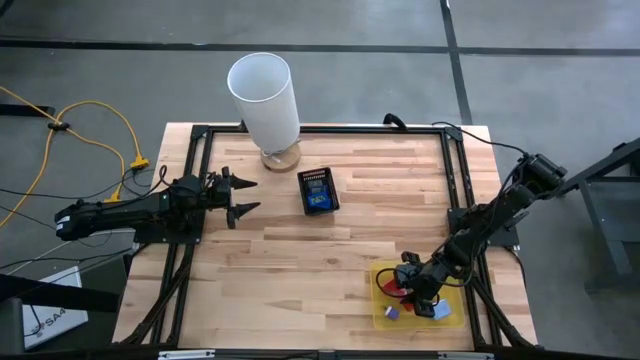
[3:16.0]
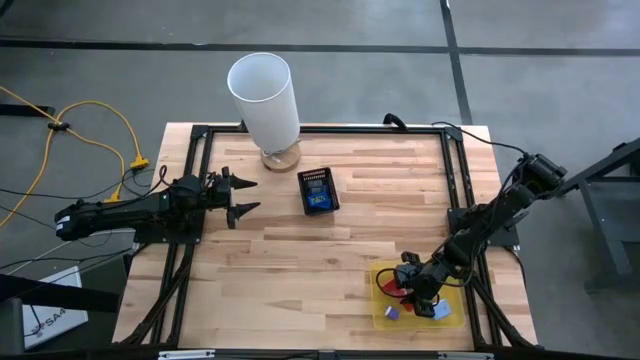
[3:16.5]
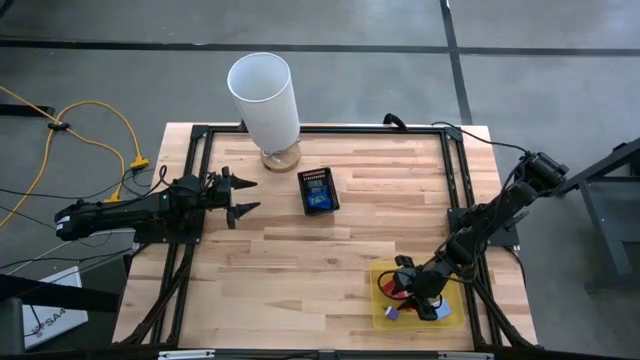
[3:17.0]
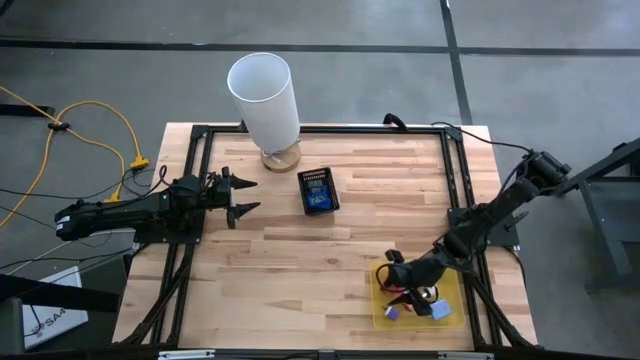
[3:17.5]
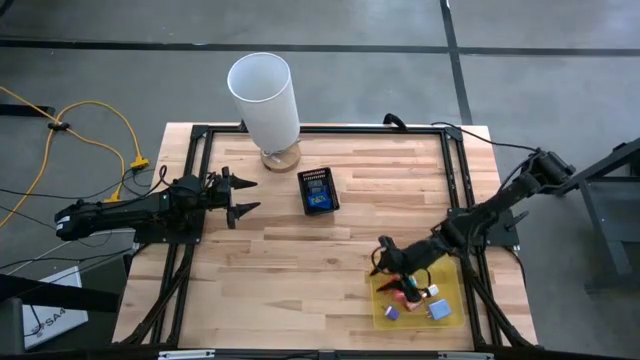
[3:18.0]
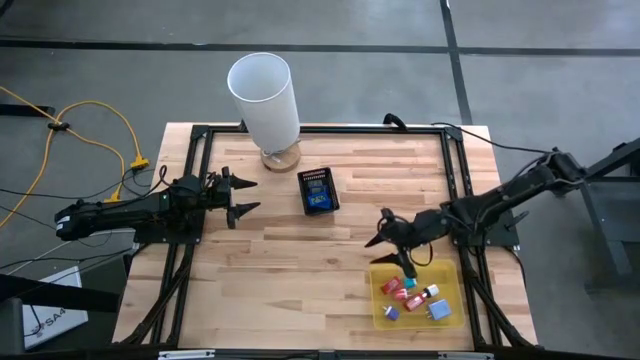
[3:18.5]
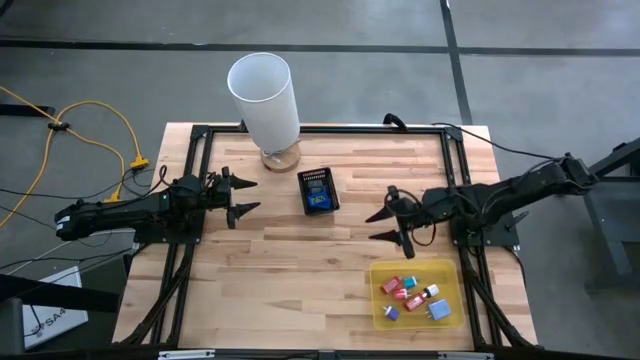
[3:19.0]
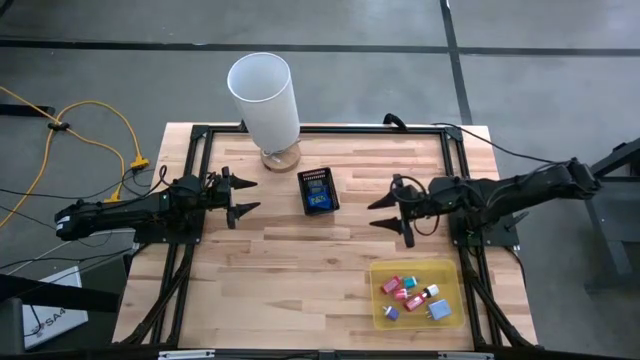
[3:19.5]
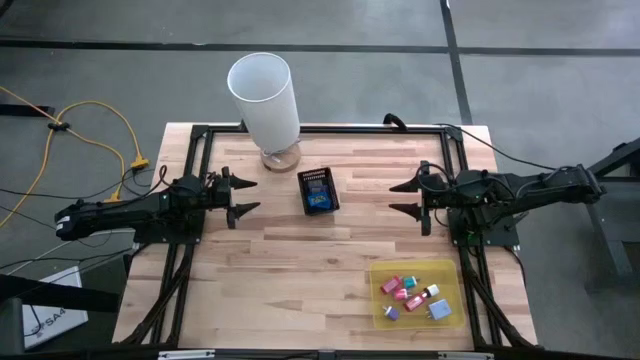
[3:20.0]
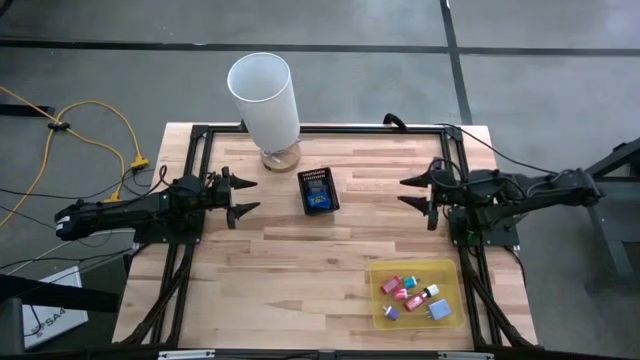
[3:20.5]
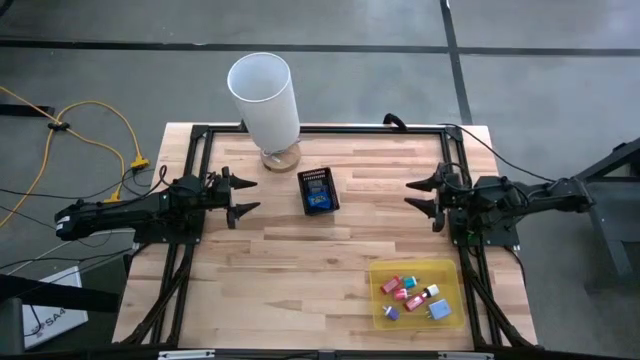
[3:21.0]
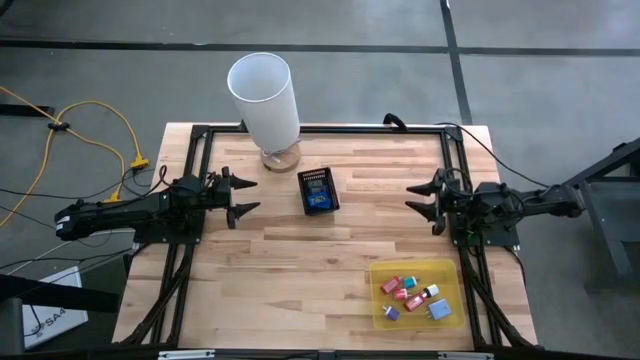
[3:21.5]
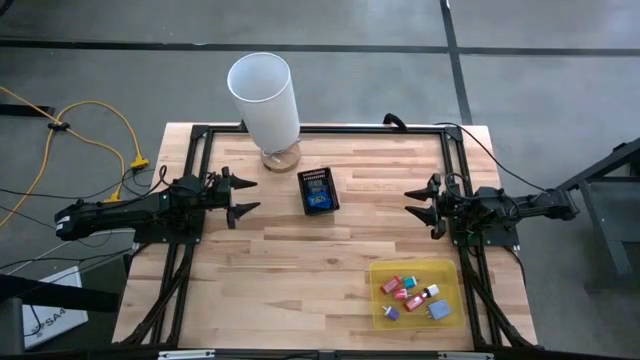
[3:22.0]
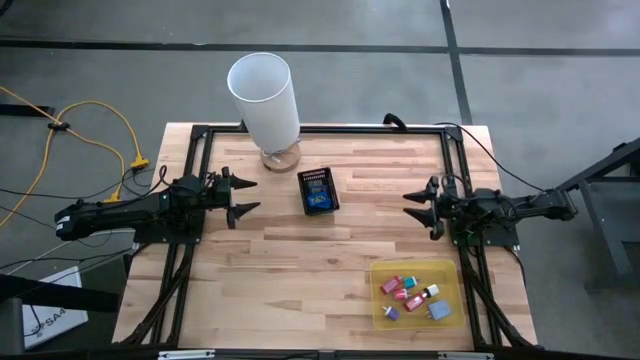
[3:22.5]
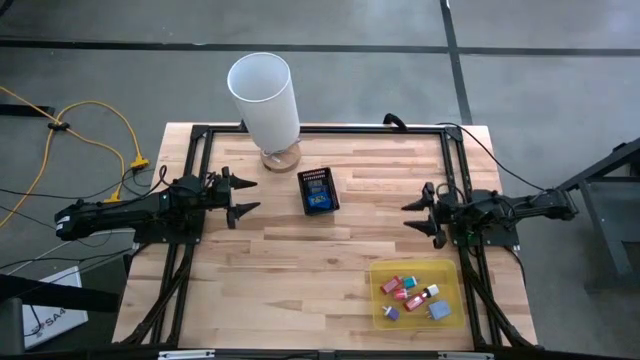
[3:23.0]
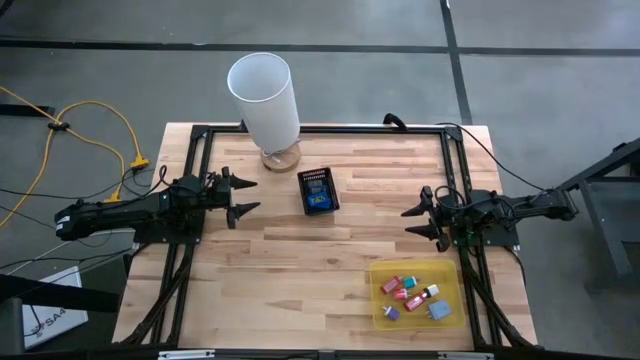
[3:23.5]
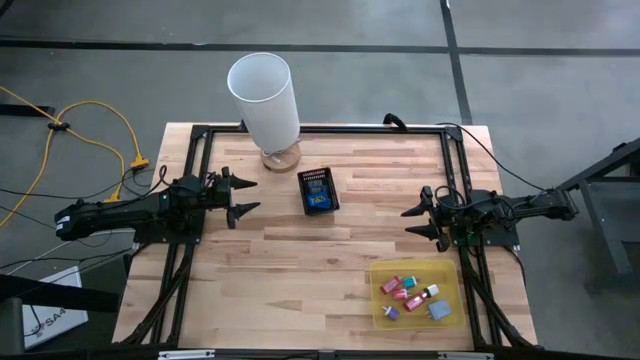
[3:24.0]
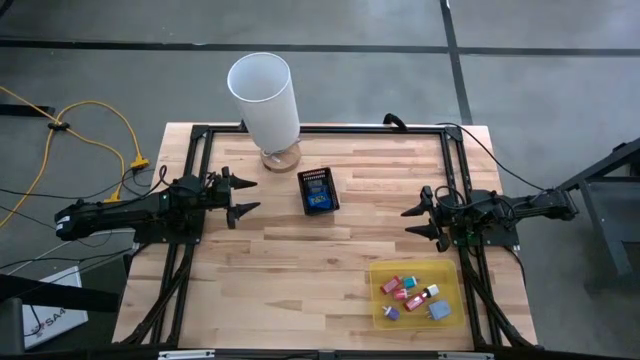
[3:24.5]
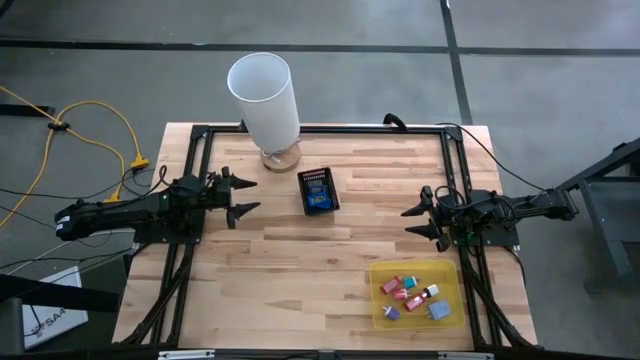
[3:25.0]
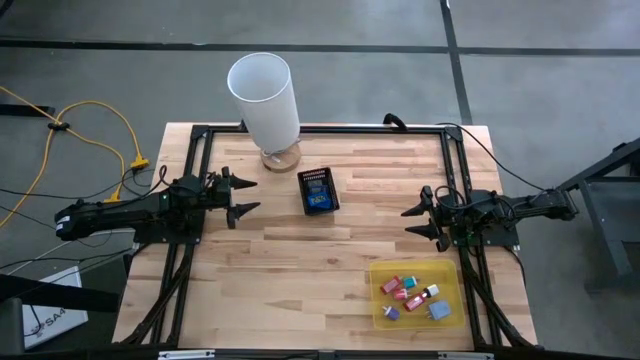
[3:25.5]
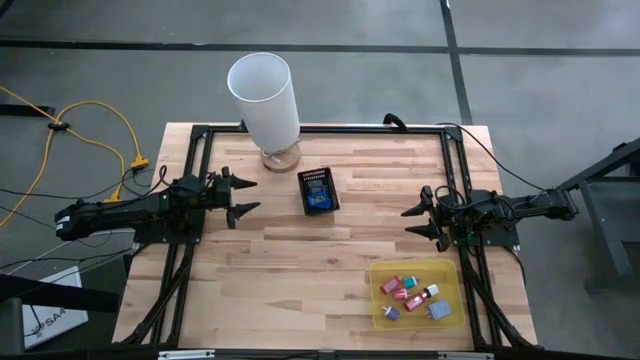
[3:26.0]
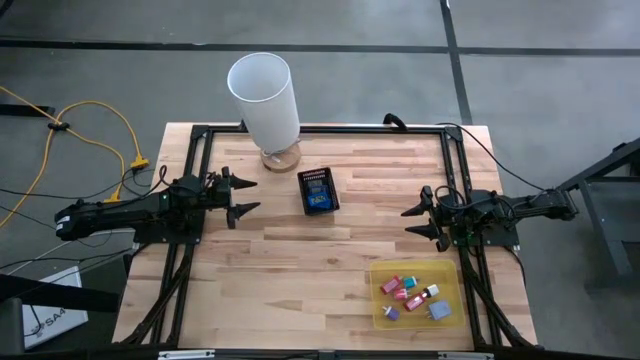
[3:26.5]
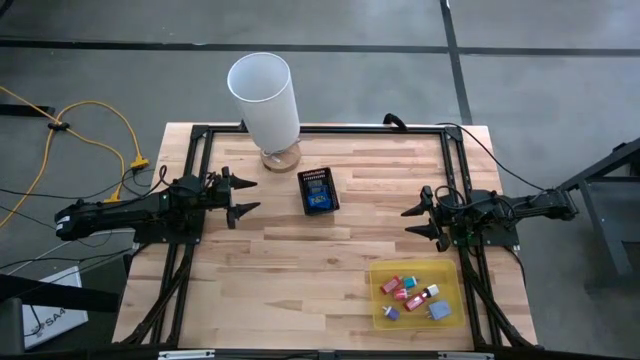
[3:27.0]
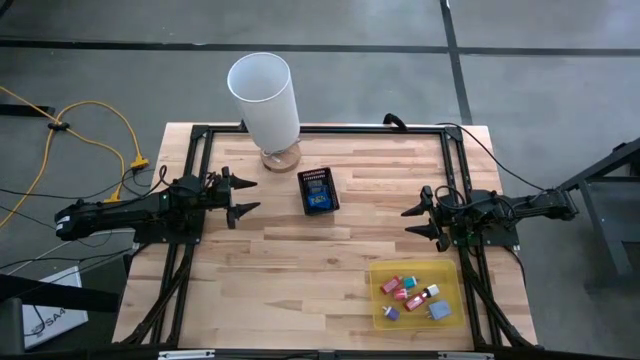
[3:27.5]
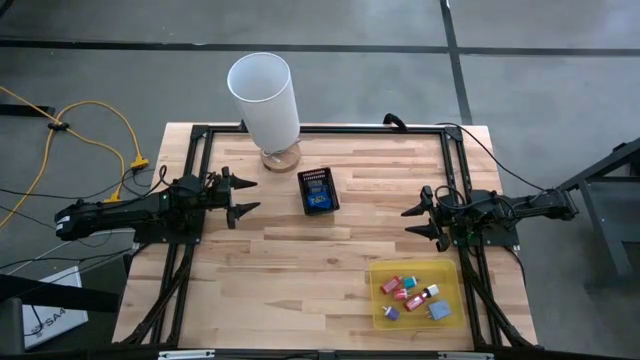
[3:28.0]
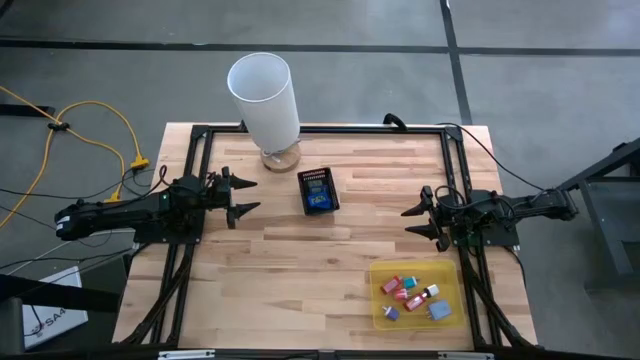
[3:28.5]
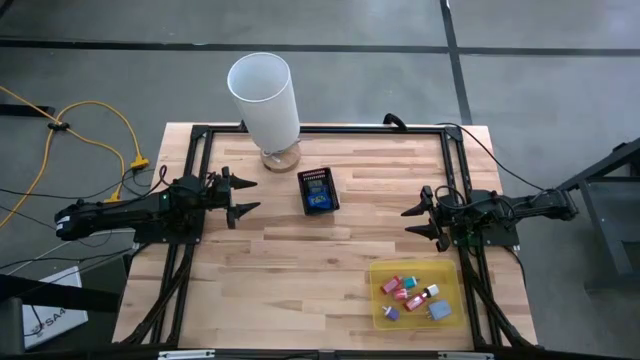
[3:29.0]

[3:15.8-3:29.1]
Task: Pick & Place Office items
Return to Home Position

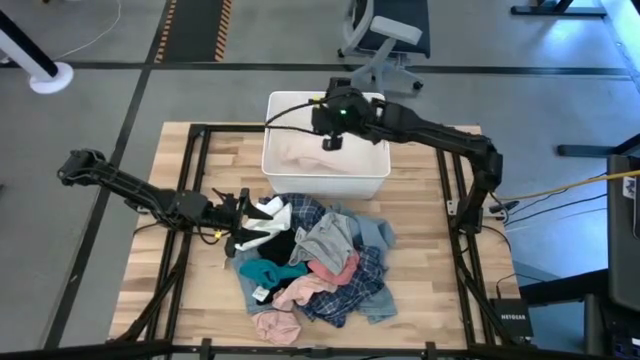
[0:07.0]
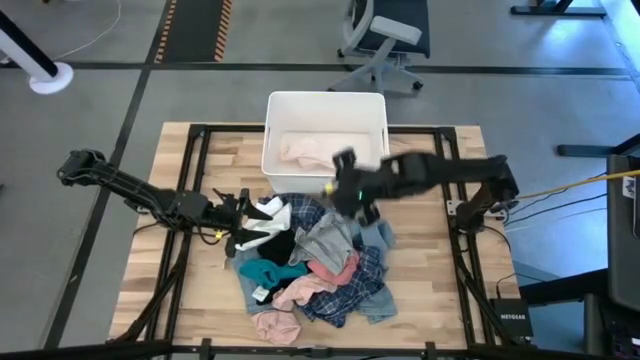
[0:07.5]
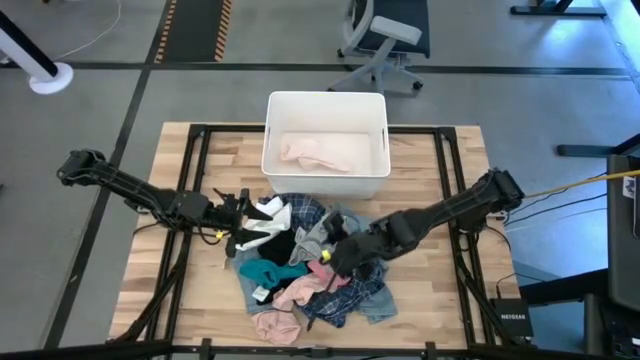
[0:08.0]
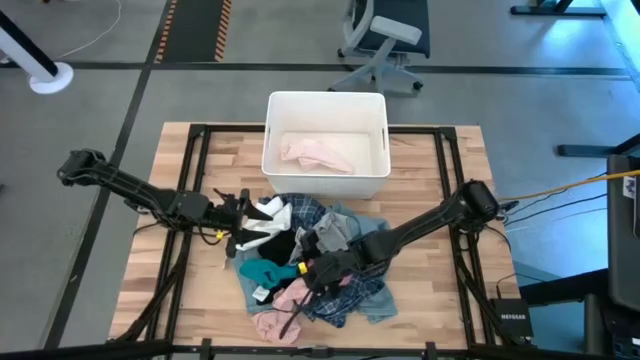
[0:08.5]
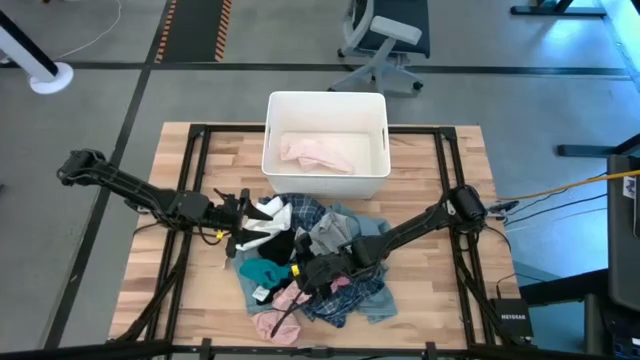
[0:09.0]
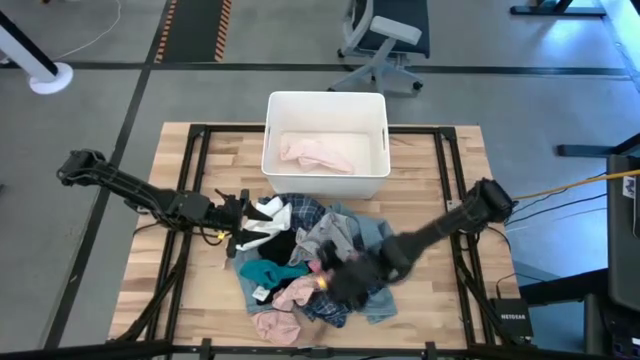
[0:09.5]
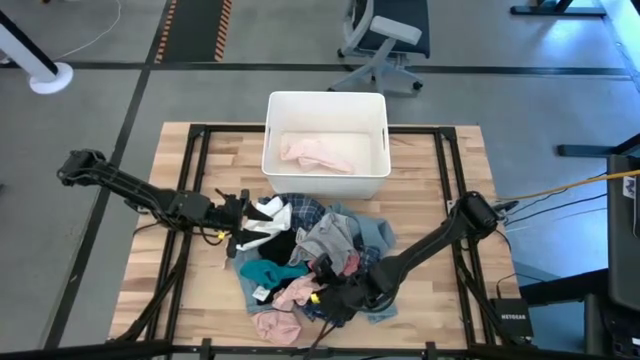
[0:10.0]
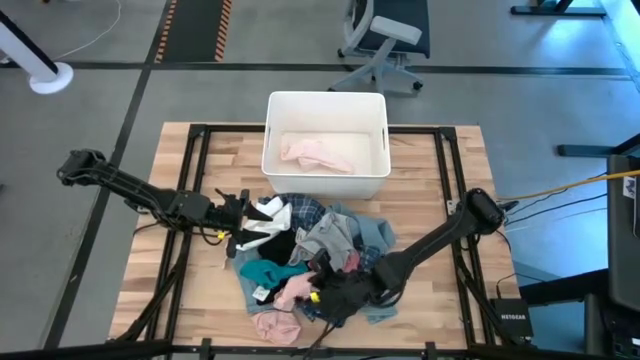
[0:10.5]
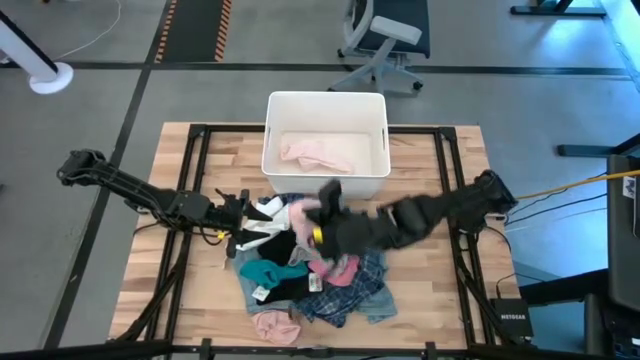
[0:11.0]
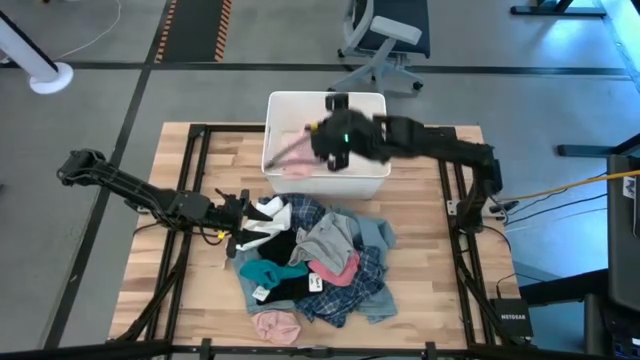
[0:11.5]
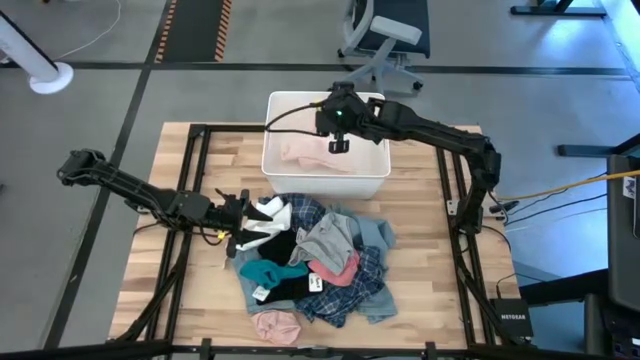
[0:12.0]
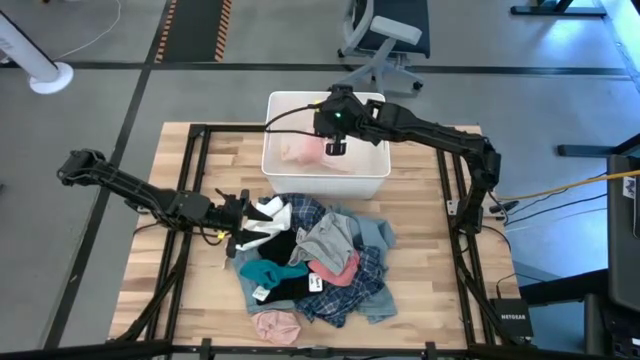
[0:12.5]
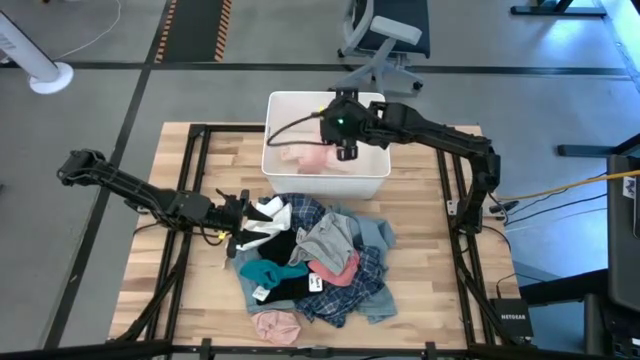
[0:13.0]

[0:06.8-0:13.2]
Task: Sort clothes
Put the top pink sock into the white laundry bin
